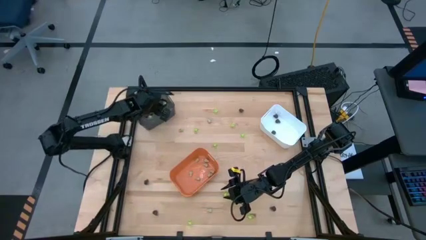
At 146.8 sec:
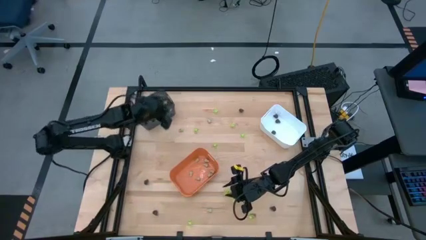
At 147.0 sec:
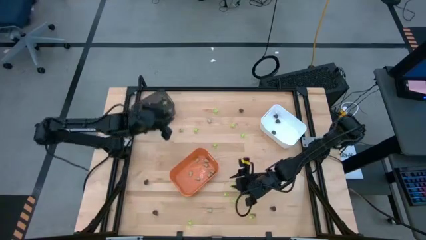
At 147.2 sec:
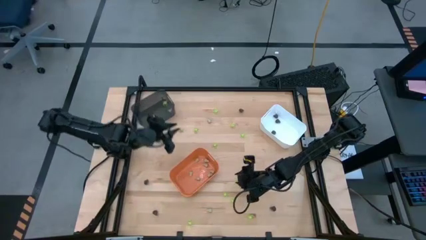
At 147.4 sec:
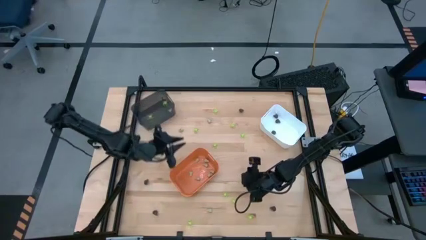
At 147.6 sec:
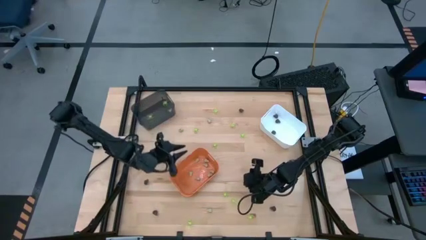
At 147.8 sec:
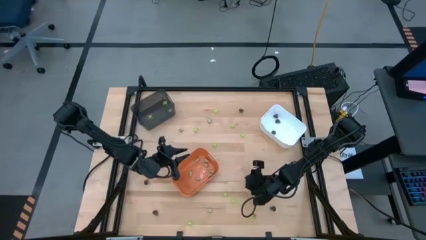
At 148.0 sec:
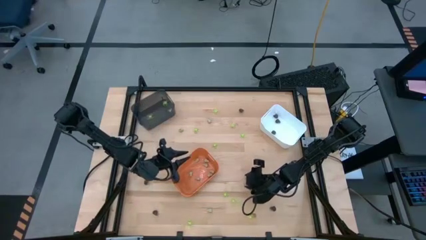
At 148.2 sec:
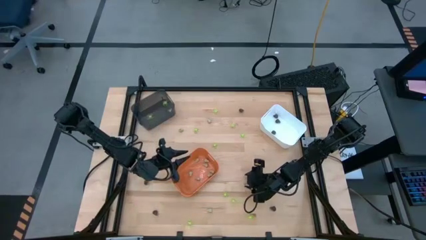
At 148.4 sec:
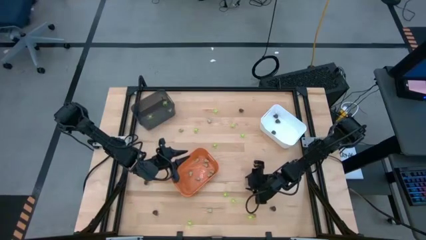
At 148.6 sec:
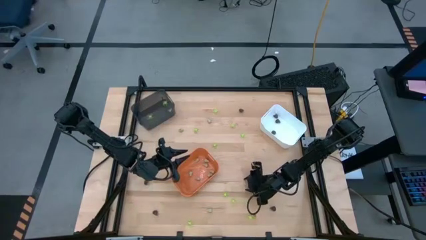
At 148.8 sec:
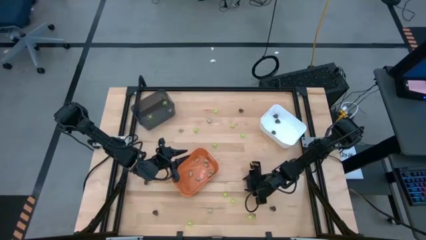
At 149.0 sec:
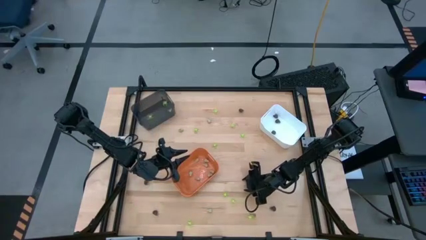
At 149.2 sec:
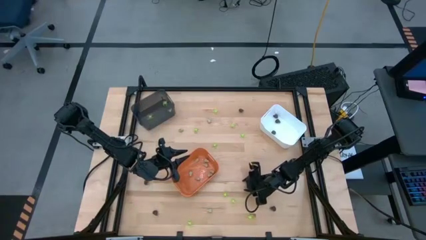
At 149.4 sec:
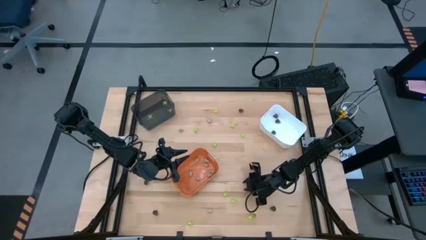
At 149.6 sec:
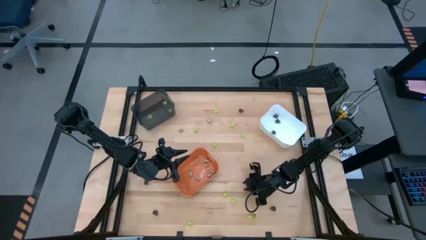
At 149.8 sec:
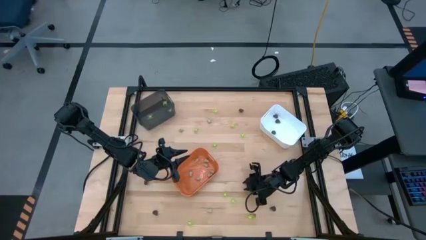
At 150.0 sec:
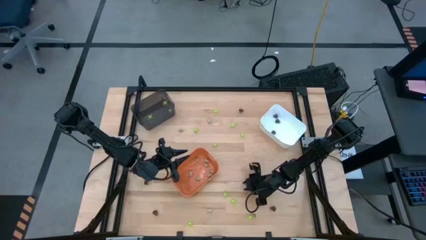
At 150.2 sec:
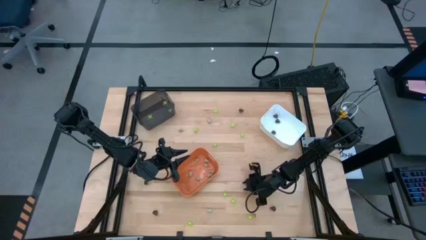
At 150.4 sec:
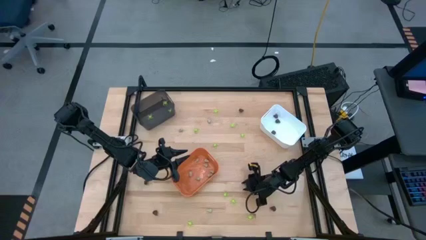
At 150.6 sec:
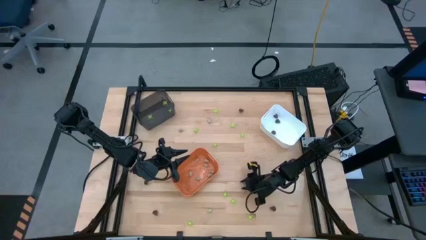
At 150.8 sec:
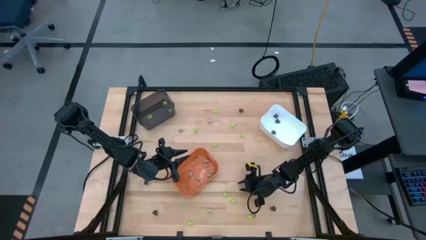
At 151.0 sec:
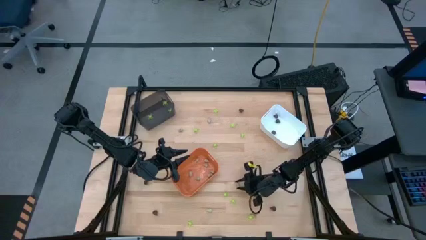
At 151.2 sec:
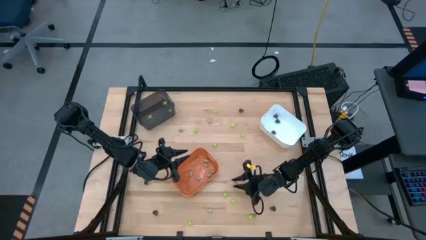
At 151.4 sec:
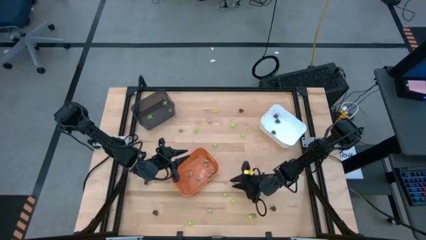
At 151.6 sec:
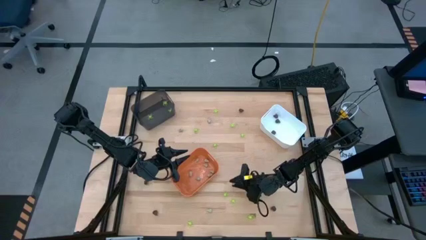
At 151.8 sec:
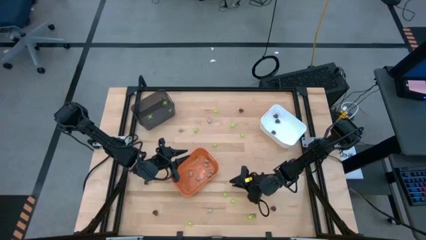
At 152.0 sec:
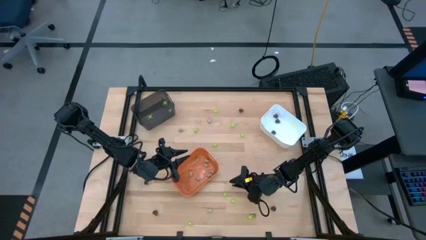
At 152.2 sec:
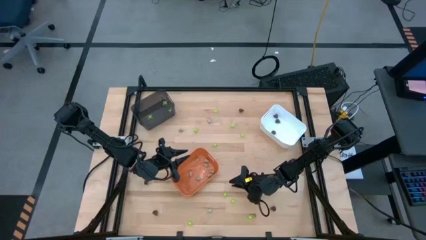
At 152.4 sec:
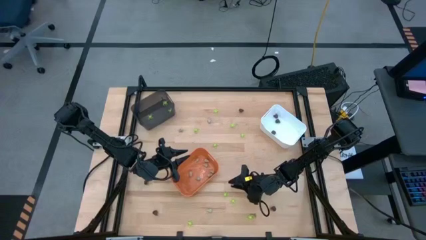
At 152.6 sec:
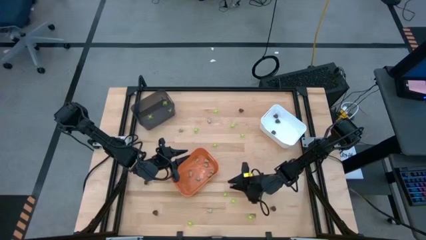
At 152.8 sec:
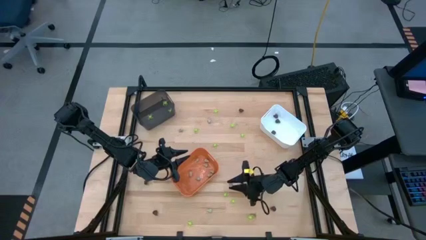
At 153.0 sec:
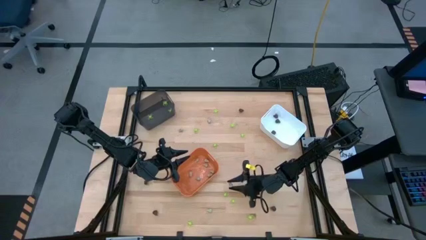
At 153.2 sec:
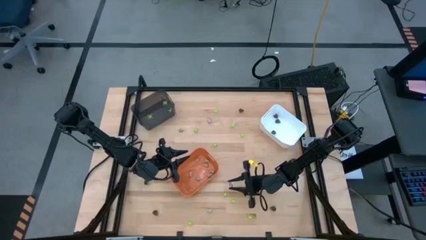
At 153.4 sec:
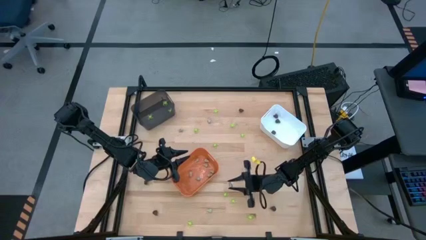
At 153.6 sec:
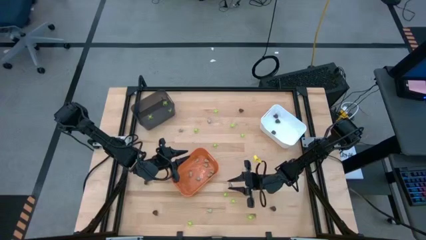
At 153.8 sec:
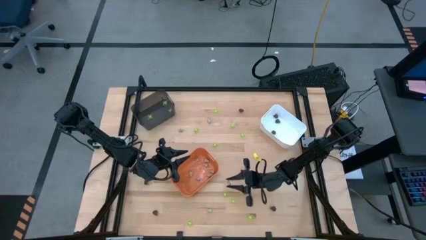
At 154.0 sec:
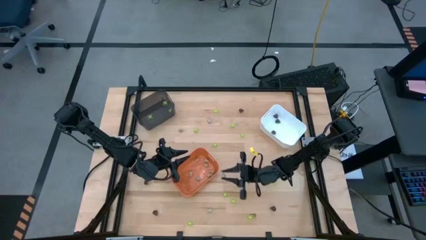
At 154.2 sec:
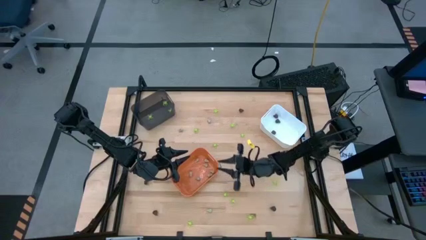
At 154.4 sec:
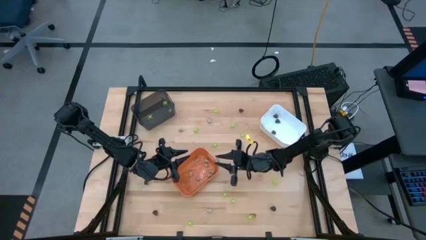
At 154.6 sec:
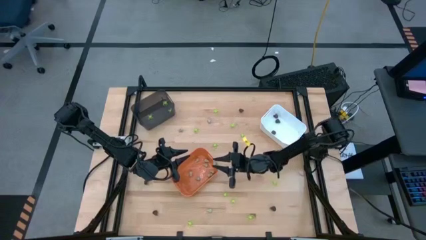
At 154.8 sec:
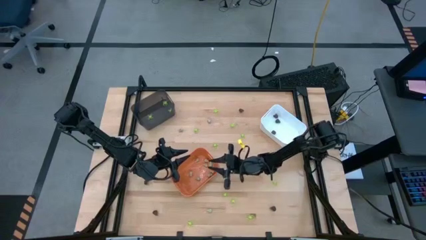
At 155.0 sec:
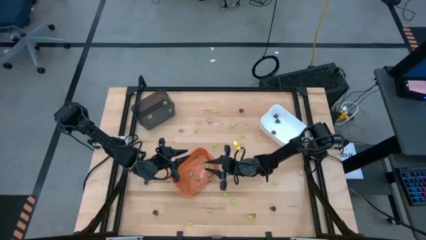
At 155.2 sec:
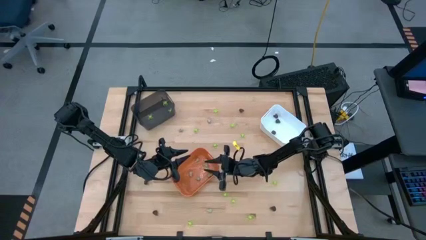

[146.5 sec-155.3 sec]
Task: Sort Halloween decoration
Put the small white skull toy into the orange bin

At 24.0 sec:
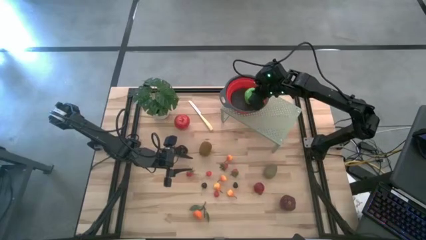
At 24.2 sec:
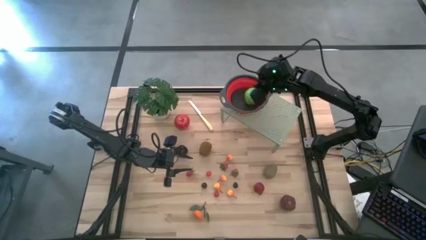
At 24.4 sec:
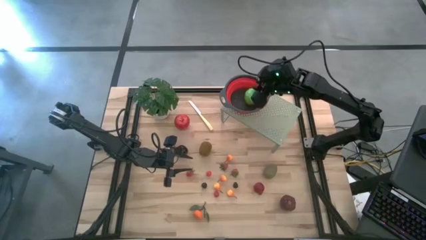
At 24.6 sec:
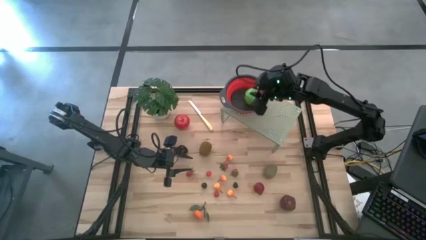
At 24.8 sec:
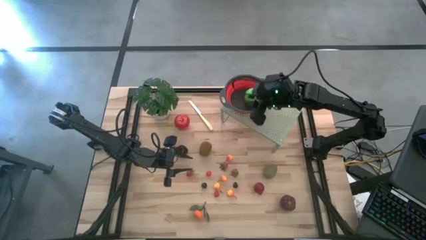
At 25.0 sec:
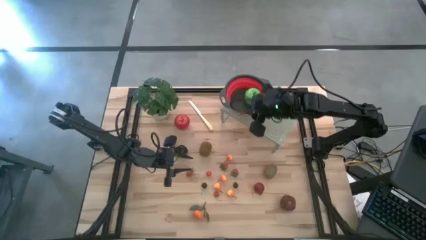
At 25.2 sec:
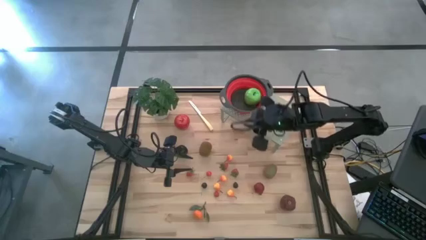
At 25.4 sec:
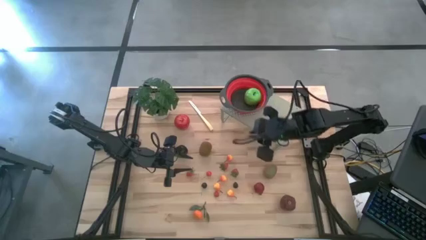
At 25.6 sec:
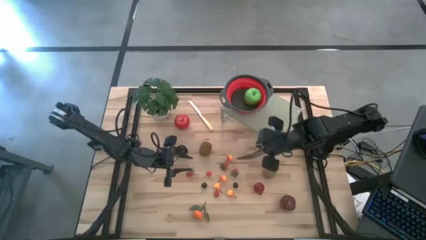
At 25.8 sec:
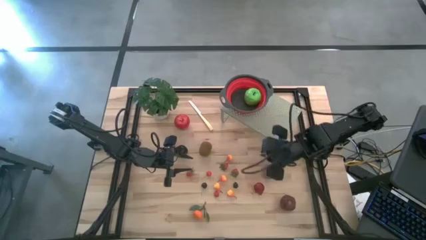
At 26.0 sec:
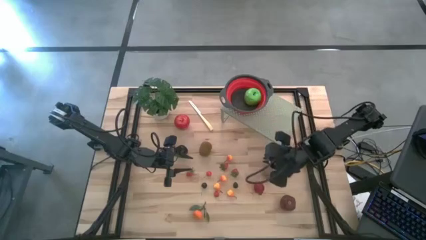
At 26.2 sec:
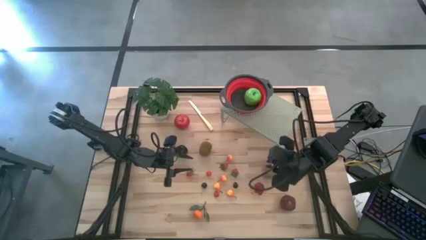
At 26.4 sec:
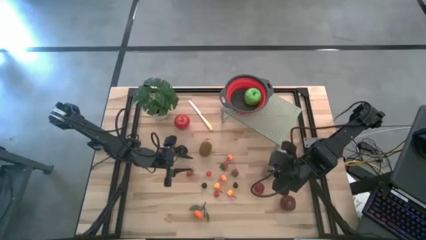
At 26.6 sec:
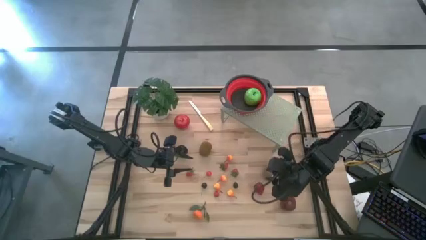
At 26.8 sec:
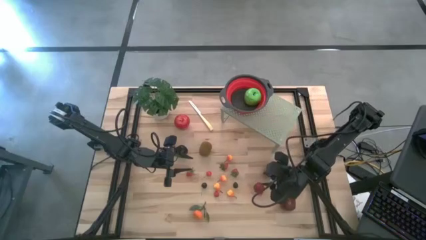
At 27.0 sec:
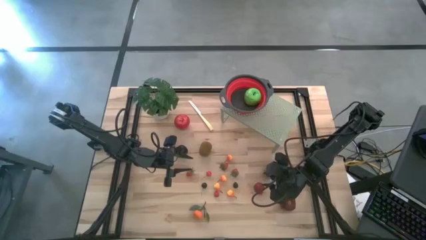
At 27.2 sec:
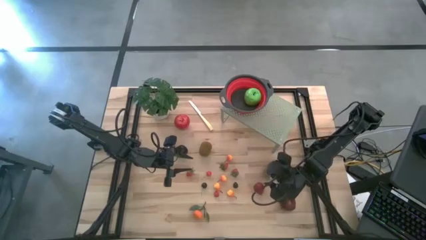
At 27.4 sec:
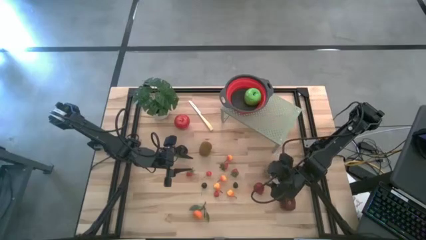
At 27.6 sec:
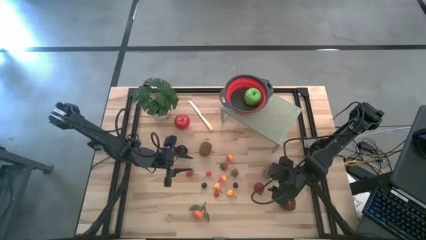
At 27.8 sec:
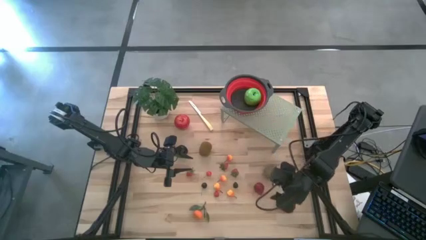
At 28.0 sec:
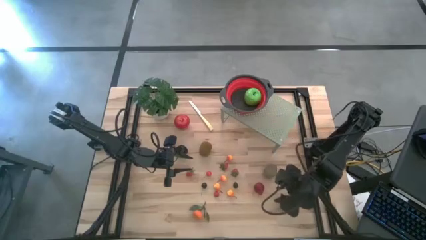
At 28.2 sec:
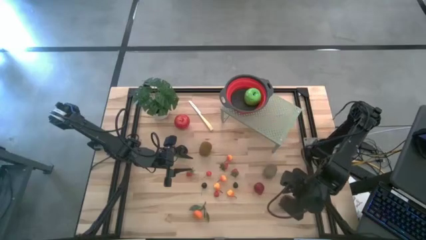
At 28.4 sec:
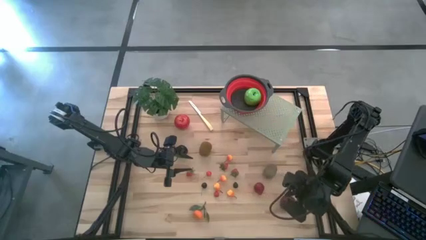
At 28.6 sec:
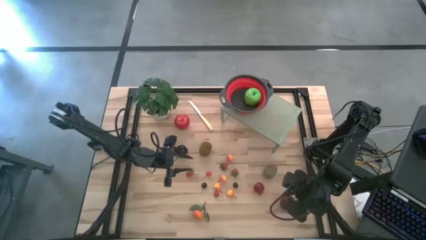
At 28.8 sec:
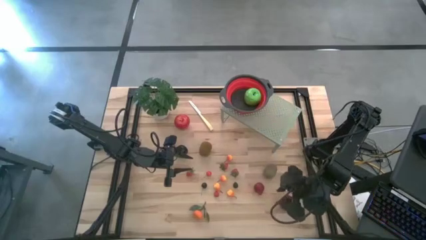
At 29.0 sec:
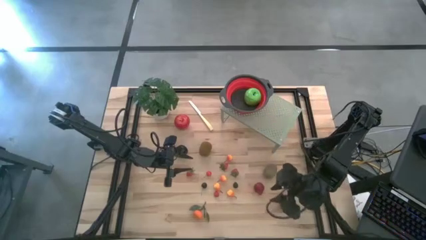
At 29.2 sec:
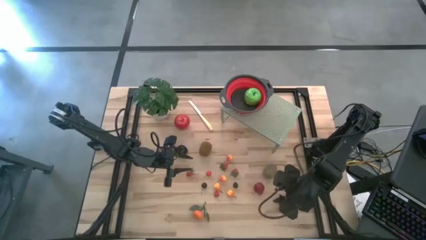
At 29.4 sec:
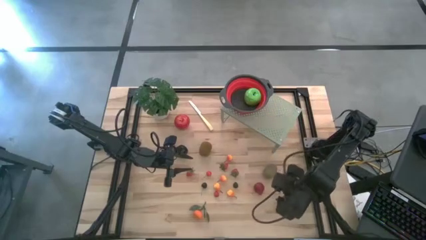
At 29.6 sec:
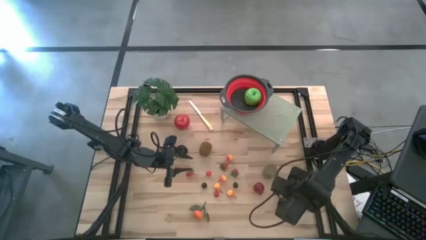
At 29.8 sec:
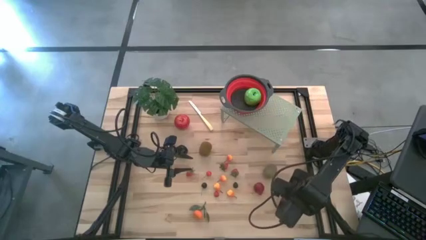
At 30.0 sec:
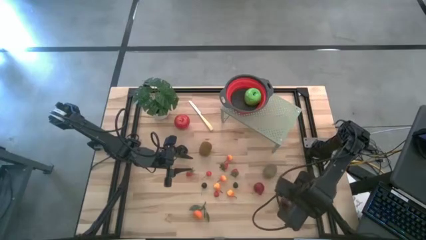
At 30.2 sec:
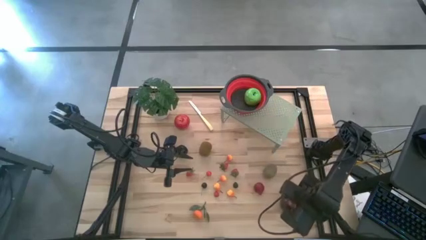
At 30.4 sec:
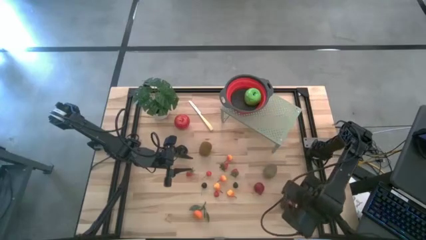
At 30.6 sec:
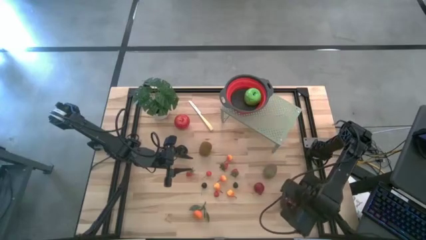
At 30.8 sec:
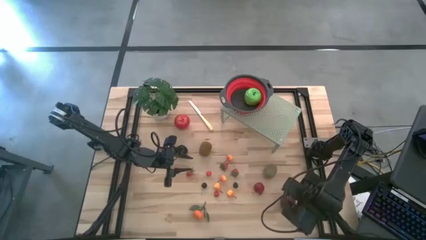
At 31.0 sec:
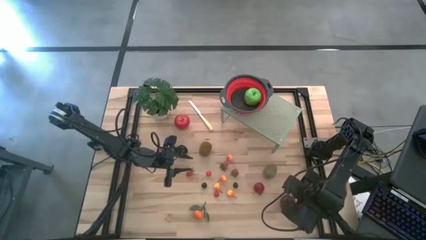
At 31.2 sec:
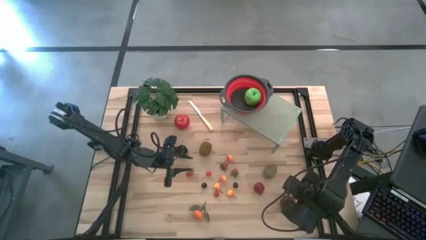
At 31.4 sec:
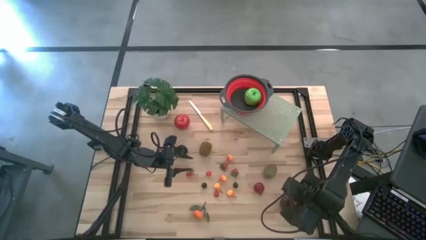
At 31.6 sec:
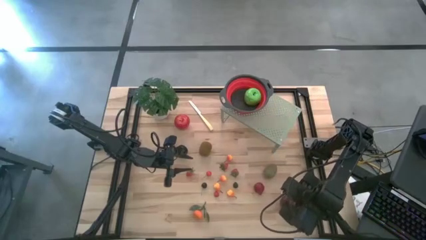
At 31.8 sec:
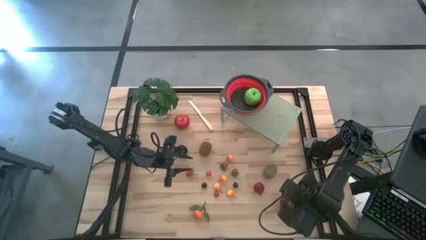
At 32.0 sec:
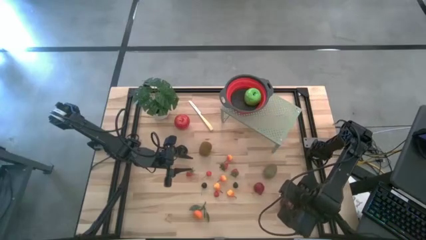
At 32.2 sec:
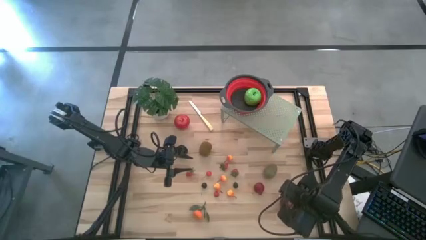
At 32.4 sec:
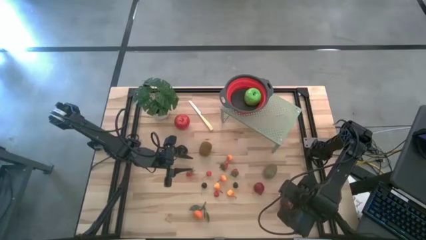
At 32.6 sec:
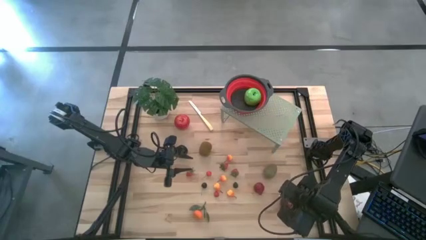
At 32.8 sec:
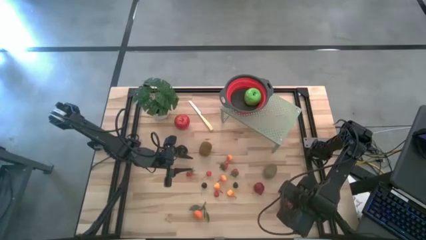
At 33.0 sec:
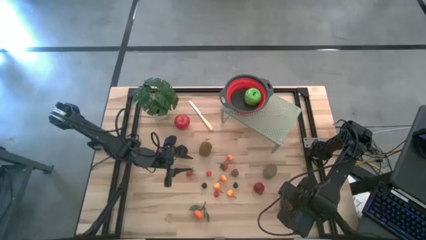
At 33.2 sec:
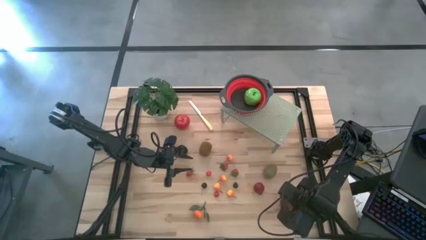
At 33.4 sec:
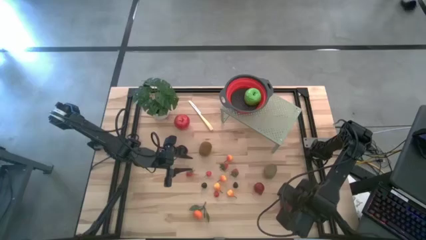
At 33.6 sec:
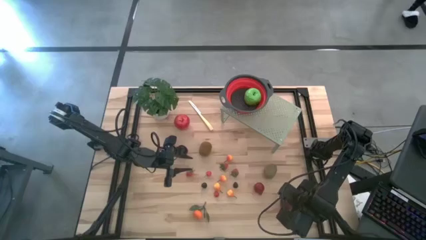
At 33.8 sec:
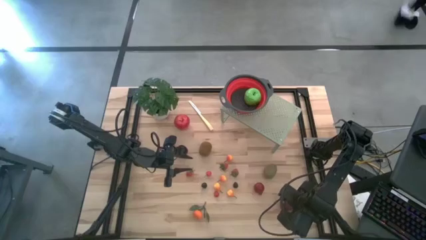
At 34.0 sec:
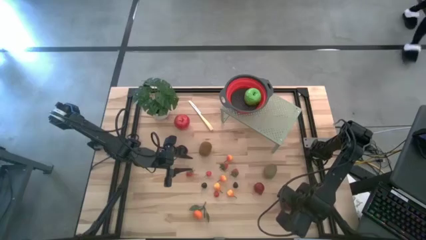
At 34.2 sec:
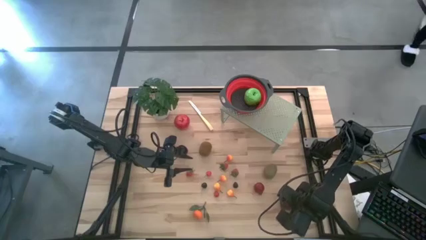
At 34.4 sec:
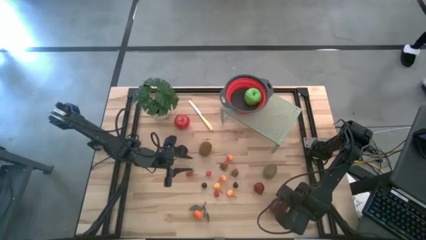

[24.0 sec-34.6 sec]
Task: Pick & Place Fruit
Put the dark red apple into the red gray colander on the shelf
